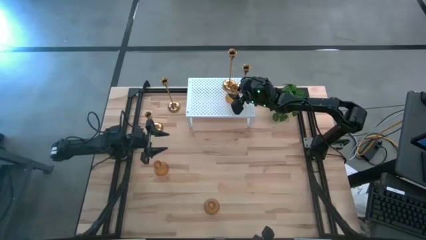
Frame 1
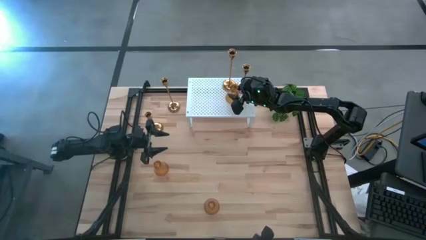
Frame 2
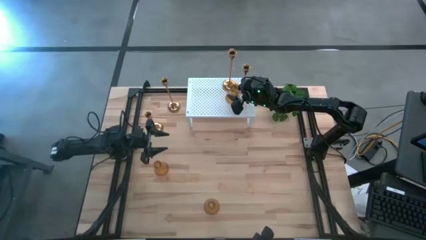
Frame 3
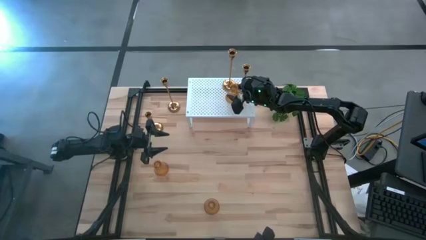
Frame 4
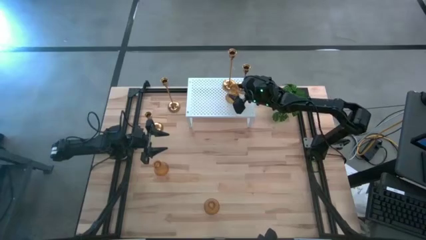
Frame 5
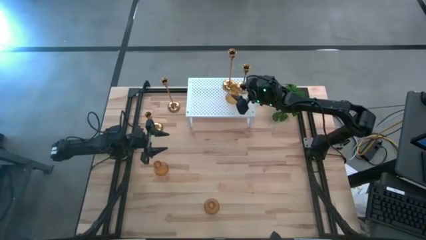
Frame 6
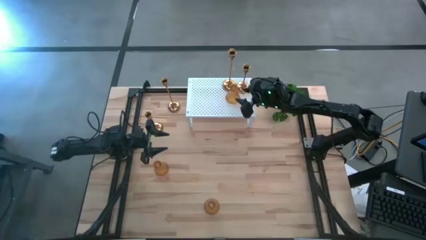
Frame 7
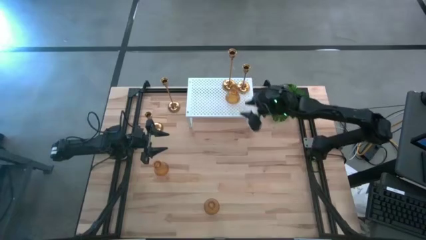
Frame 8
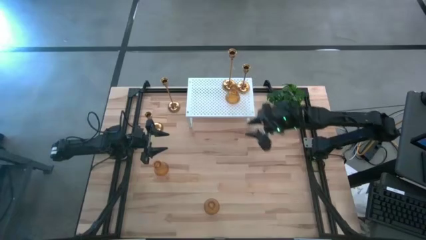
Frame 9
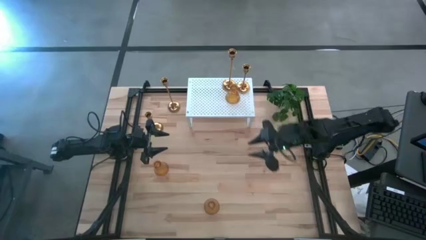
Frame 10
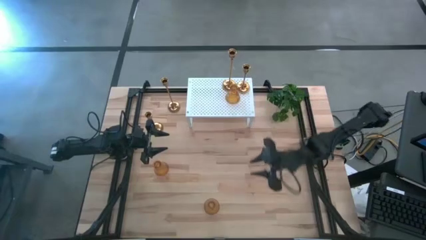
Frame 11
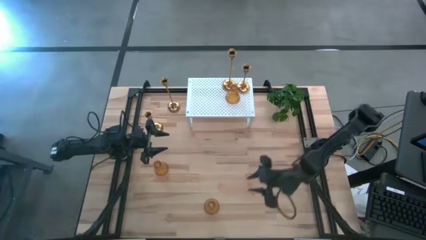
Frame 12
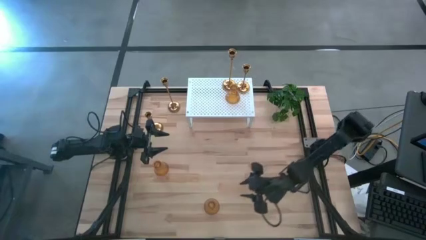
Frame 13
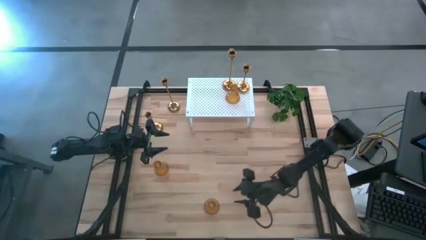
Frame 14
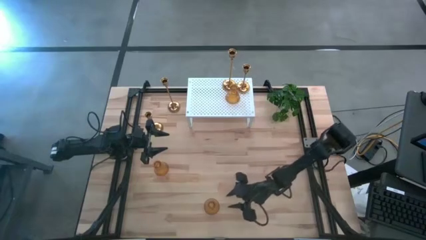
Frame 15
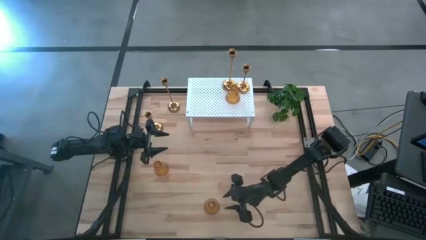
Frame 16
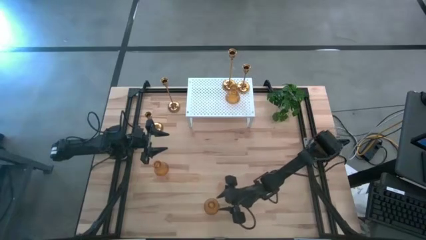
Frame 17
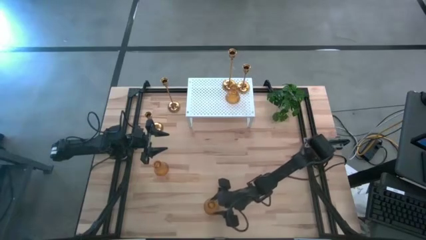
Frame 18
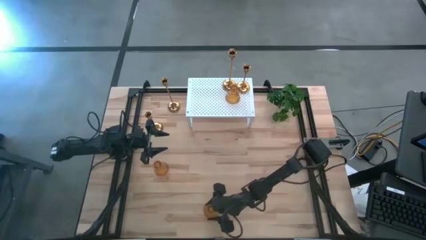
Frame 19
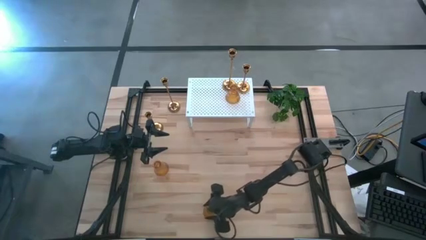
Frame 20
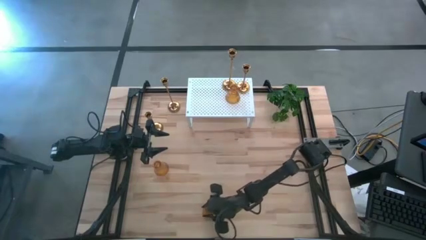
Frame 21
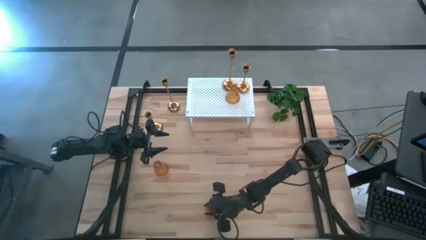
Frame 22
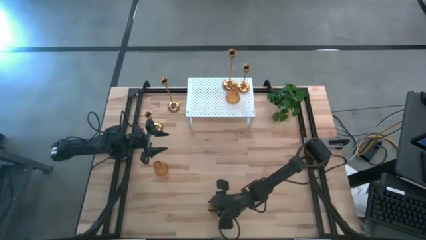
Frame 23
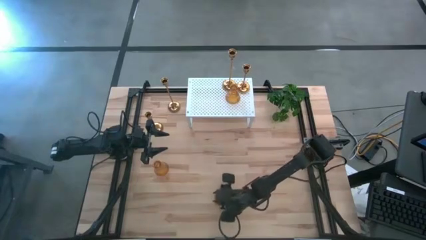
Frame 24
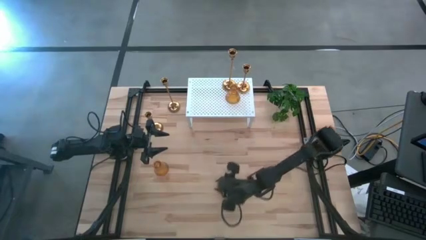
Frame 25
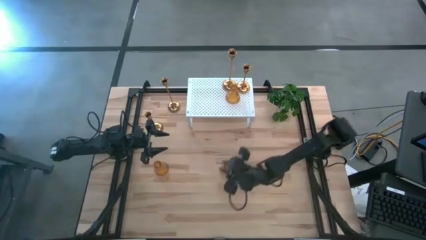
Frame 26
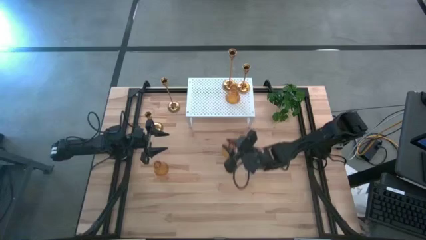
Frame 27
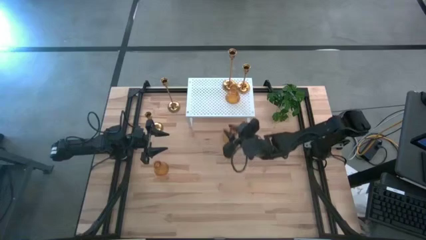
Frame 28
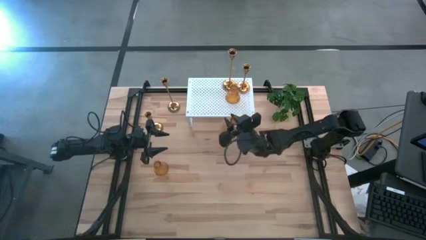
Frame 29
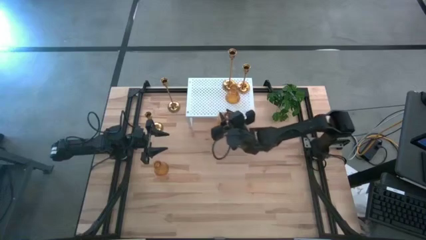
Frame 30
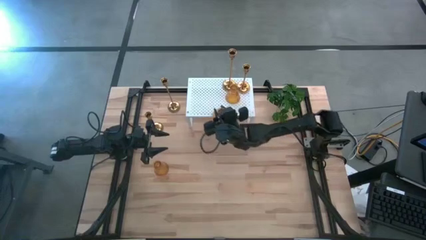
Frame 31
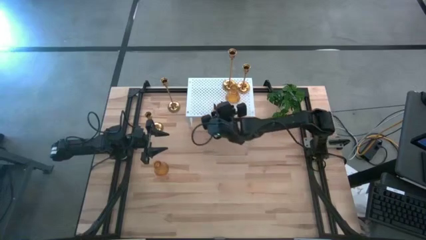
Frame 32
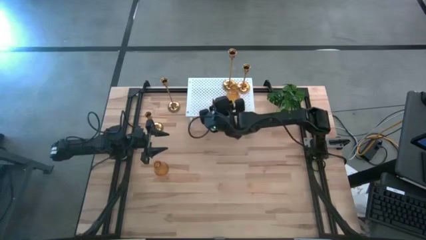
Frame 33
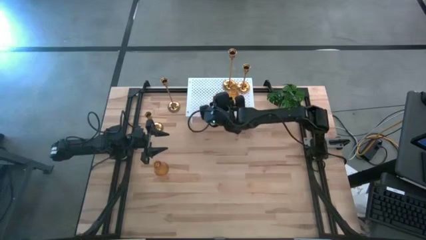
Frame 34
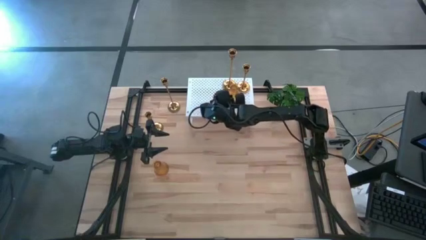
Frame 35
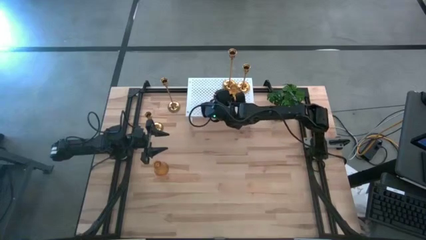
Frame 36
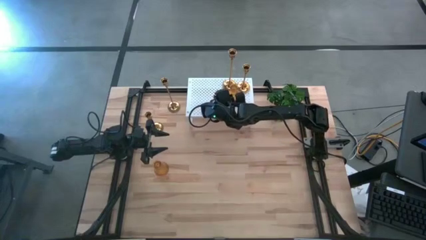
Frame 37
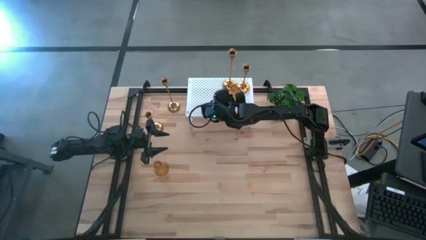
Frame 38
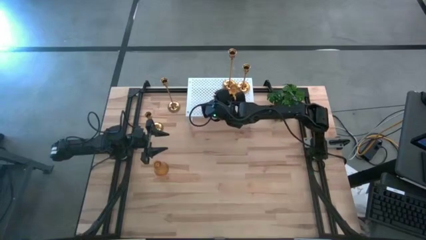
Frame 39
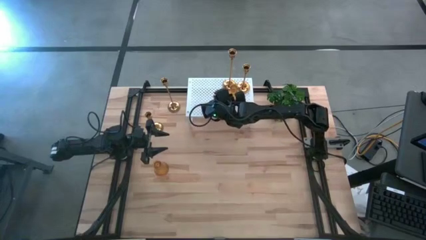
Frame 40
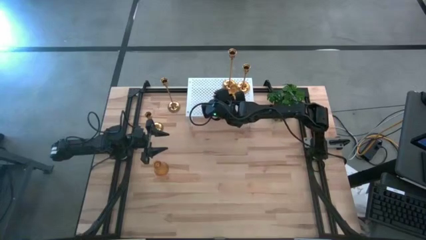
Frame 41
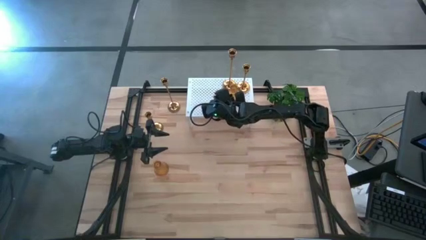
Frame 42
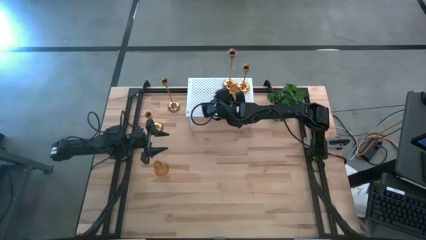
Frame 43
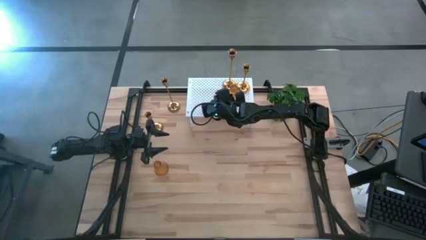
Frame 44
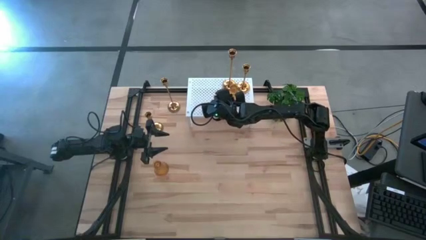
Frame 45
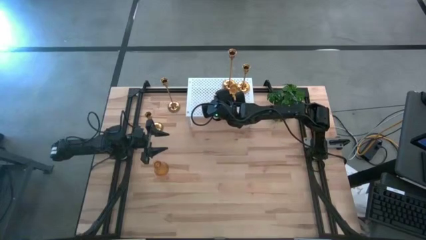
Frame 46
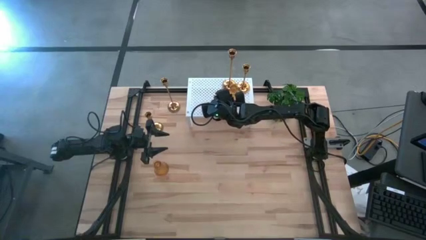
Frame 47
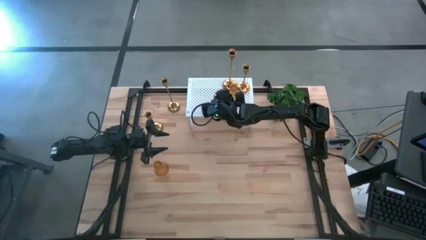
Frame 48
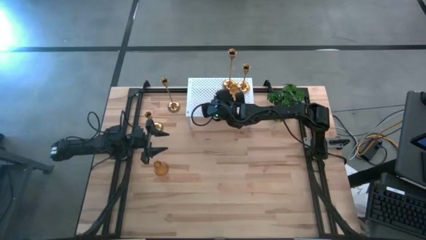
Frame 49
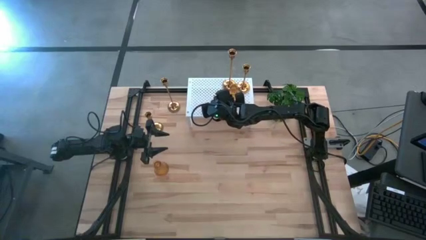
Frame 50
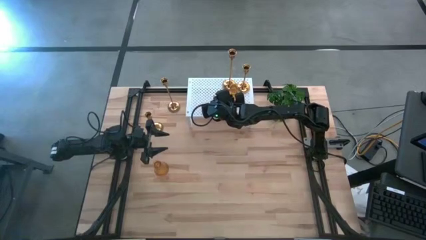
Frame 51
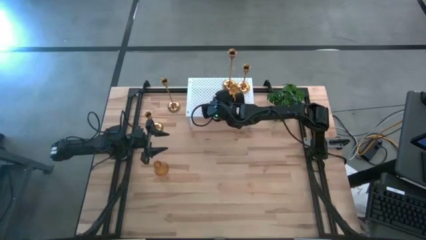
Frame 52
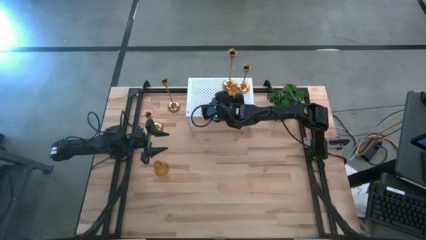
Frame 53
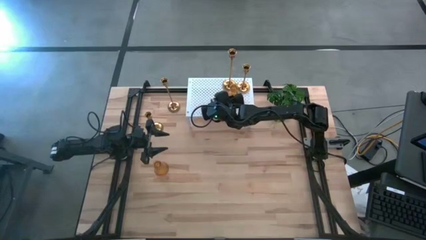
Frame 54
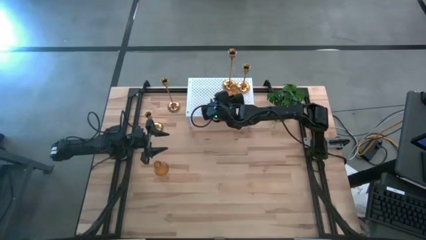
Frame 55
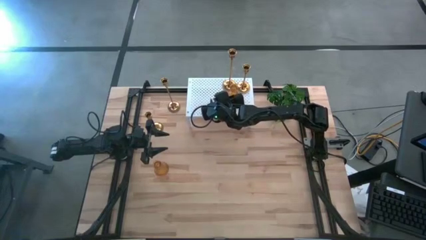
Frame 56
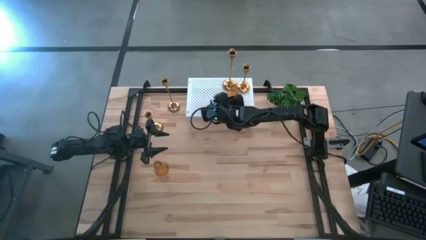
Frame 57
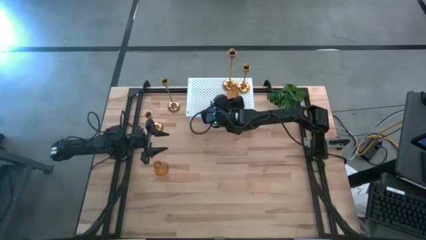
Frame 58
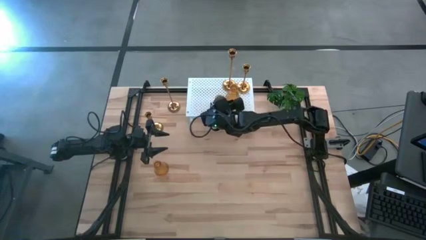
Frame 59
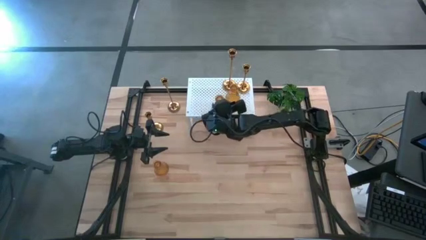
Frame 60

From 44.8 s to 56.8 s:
Task: Pick & Place candle stick holders
Put the bottom orange candle holder on the shelf
